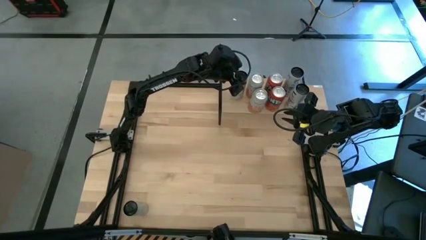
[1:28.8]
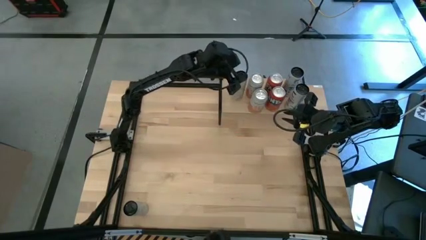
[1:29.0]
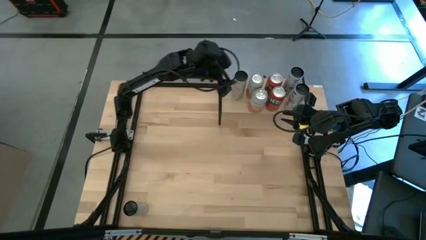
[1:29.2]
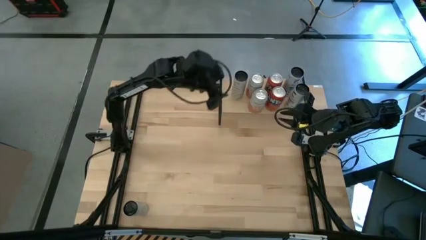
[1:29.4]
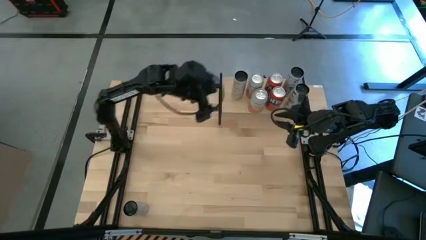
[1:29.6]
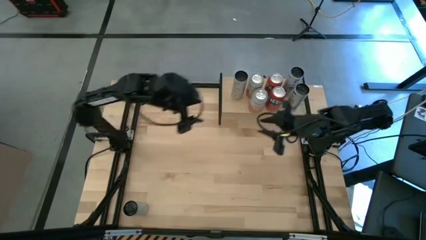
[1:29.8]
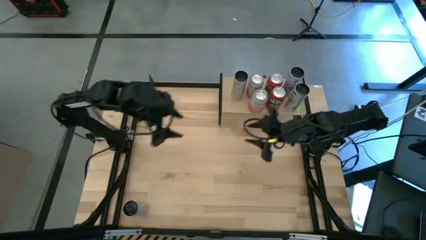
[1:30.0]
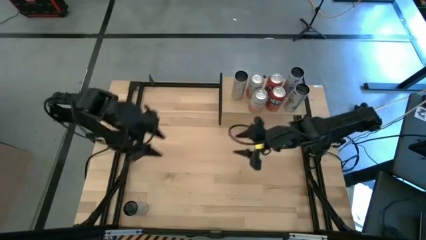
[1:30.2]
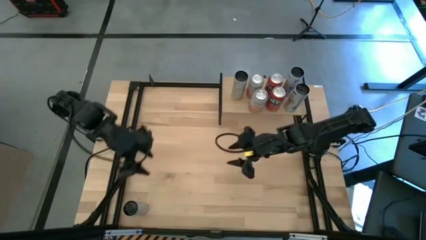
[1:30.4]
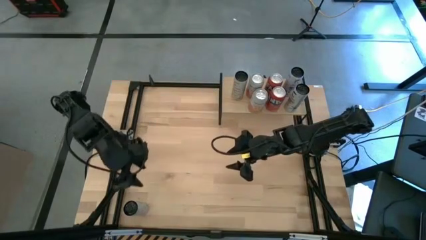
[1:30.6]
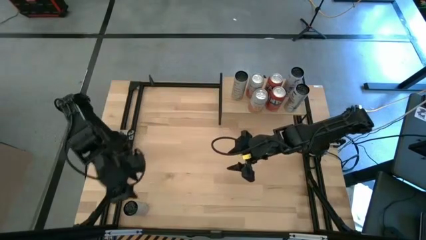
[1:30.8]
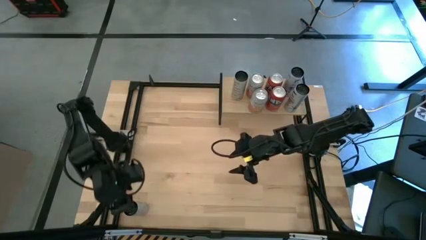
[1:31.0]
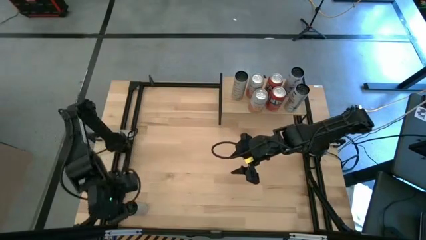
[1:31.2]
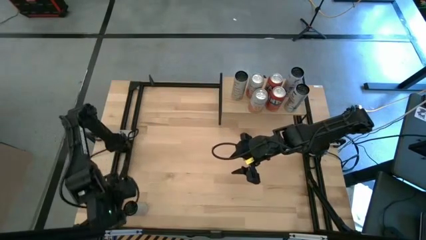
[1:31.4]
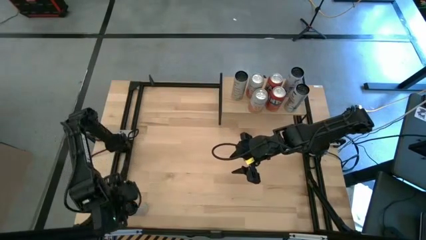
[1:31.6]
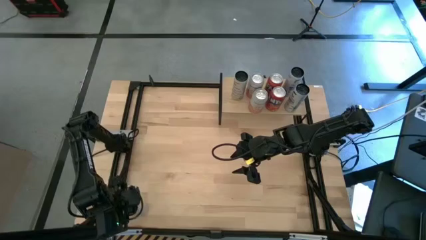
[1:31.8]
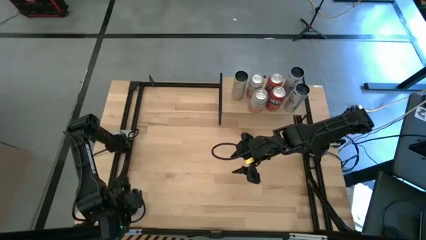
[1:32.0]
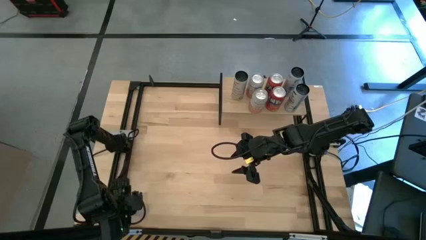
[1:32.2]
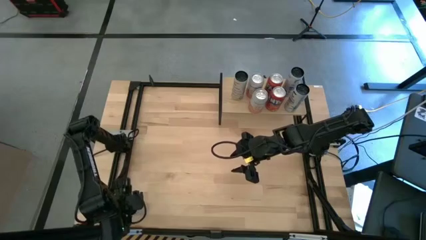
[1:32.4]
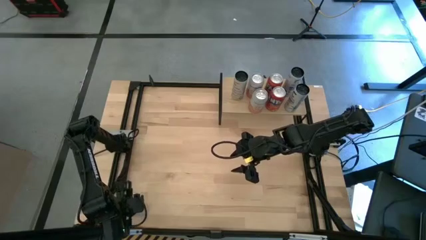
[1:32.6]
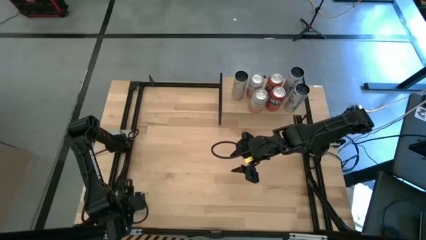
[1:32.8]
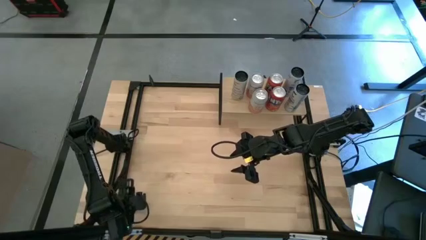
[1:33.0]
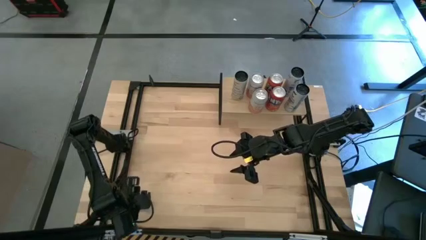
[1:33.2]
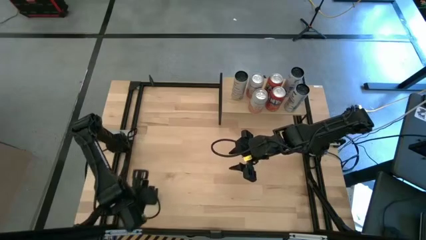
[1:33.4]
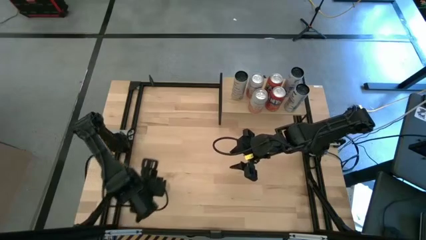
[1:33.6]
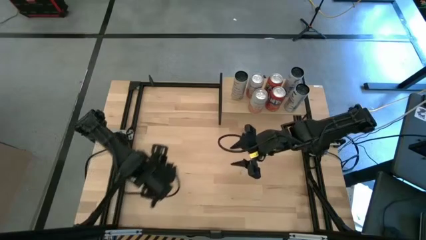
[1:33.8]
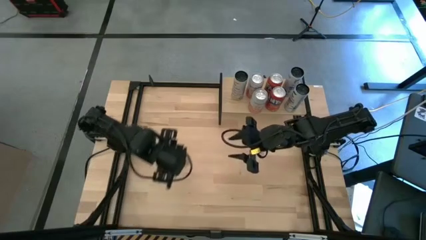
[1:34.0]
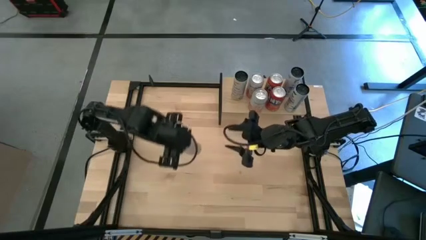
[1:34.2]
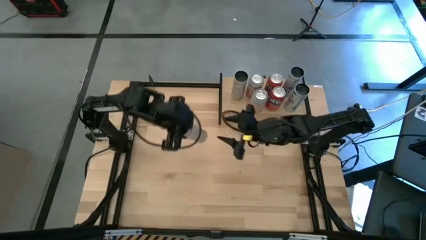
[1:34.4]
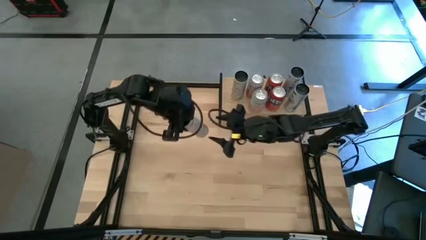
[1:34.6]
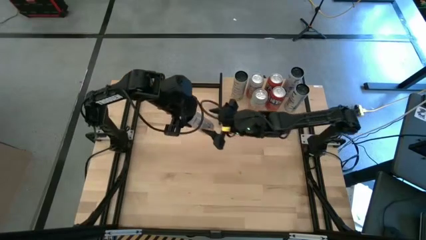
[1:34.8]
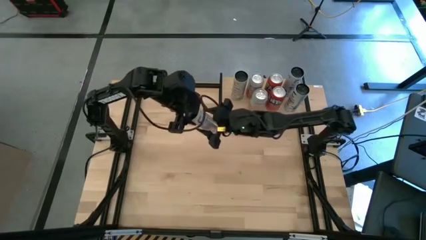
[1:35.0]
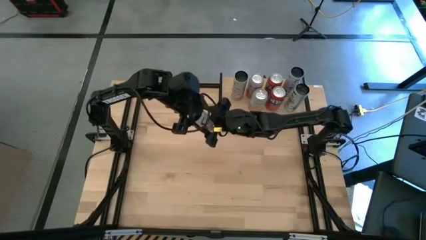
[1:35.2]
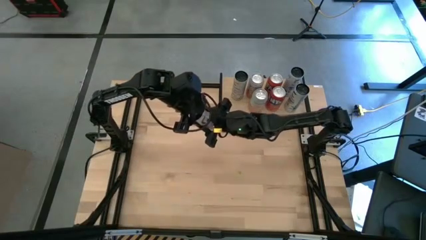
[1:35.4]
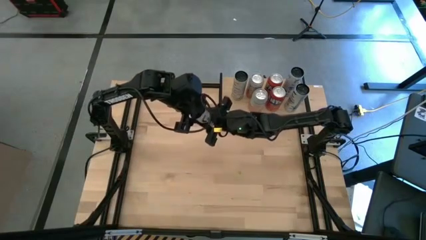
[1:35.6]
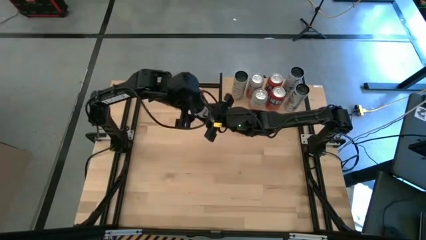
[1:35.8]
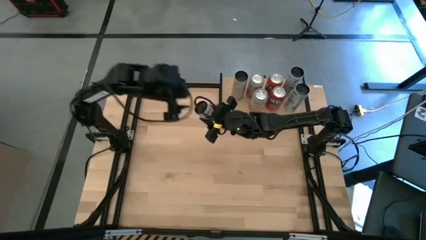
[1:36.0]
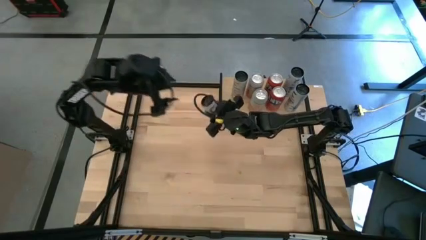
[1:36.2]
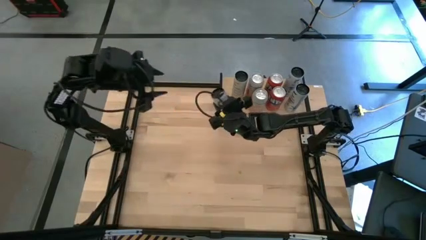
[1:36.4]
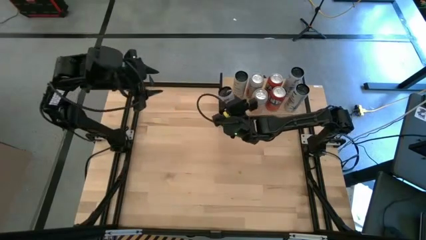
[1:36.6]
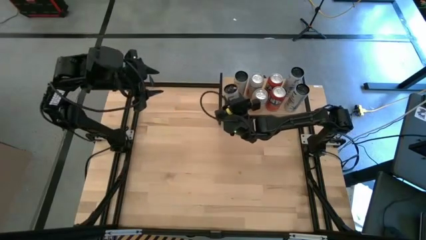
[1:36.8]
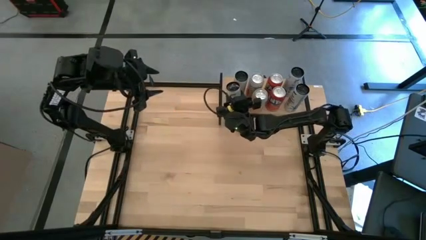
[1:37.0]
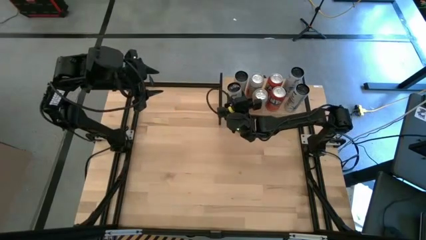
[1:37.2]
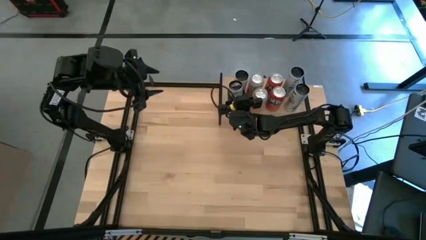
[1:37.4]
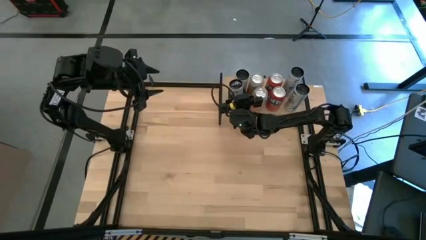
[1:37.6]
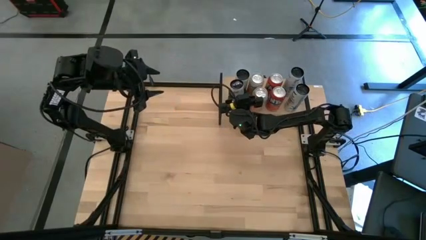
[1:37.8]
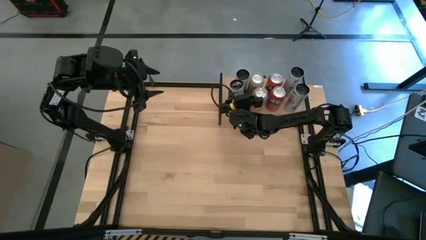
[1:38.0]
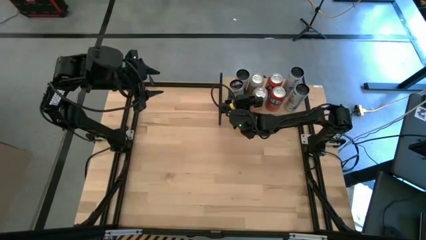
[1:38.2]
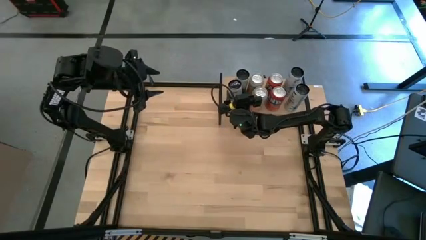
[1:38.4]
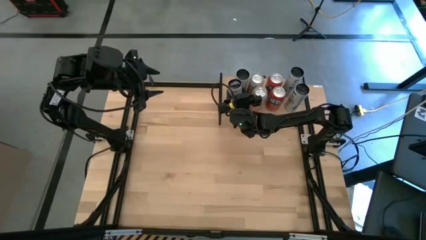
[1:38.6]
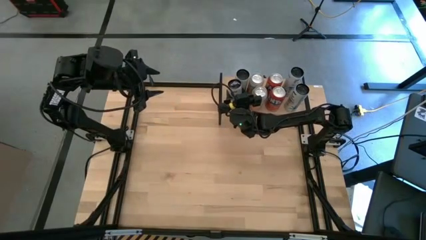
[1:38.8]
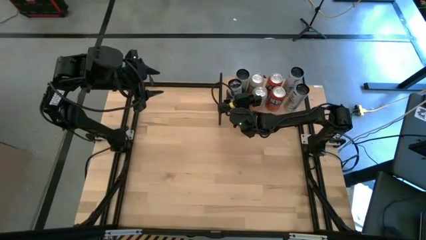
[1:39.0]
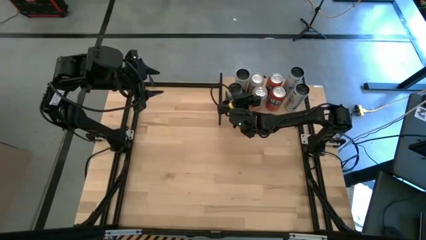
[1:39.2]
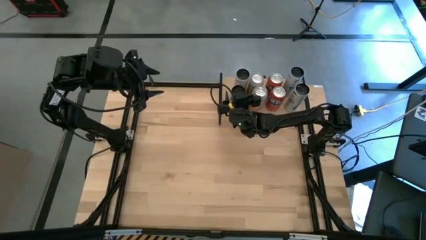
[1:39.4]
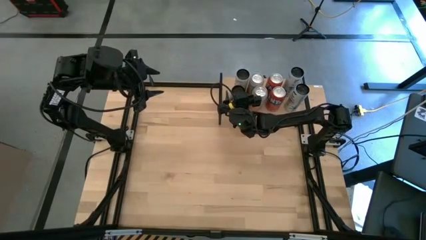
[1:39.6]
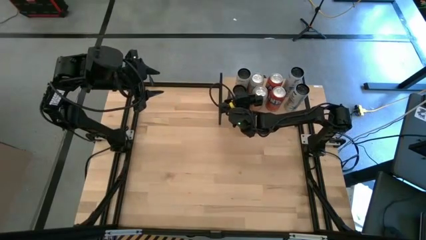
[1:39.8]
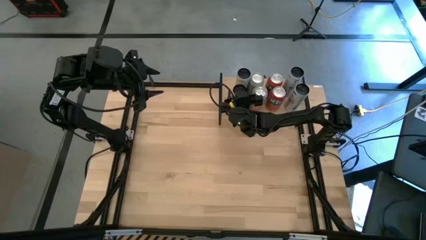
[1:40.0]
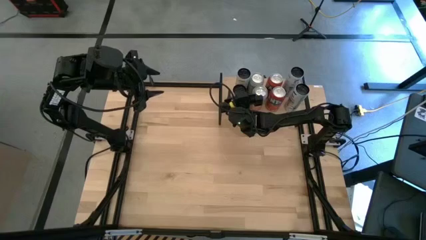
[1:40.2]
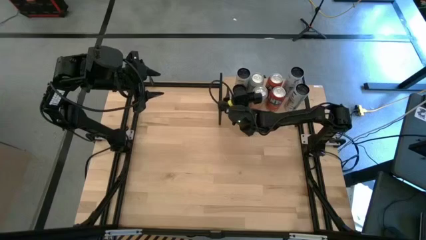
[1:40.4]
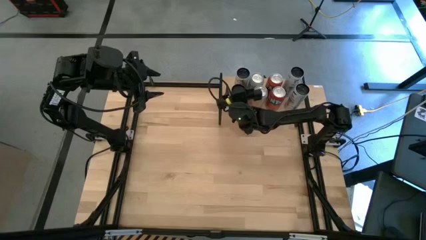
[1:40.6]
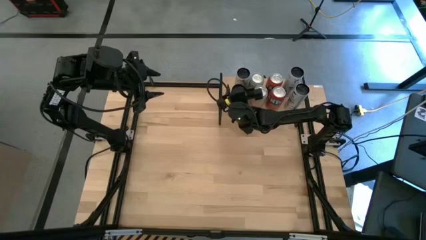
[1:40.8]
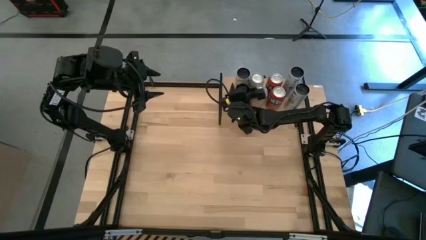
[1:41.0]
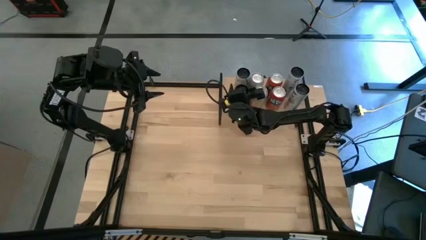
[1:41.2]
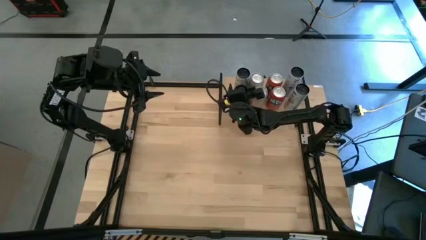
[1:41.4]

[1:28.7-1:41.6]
Task: Place canned beverage on shelf
Put the white yellow soda can on the shelf aligned with the other white yellow soda can

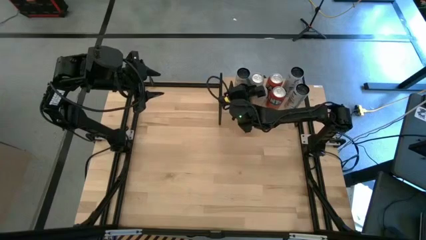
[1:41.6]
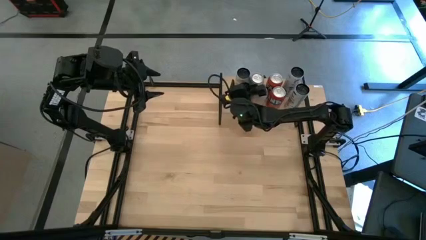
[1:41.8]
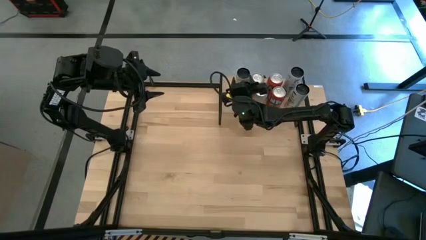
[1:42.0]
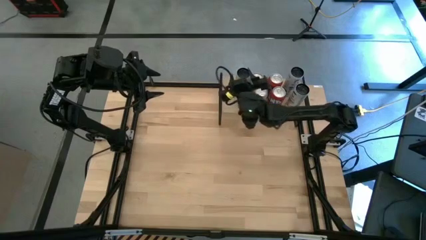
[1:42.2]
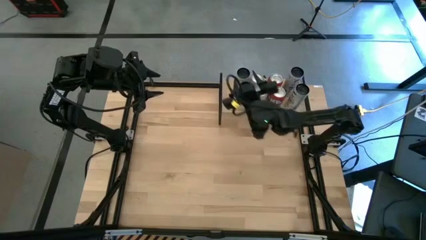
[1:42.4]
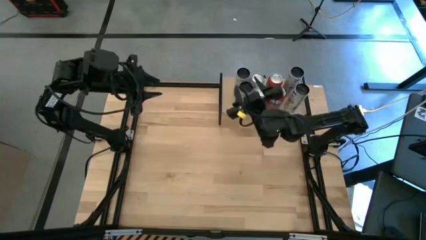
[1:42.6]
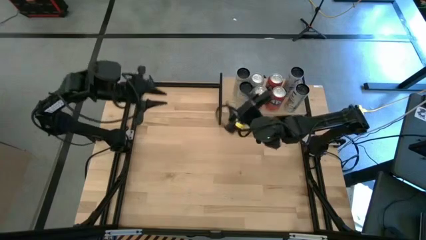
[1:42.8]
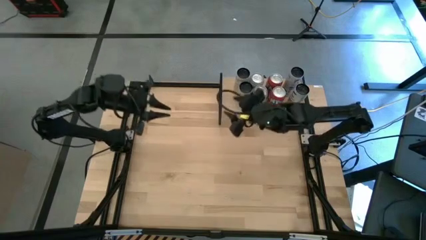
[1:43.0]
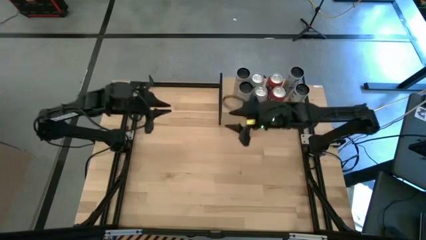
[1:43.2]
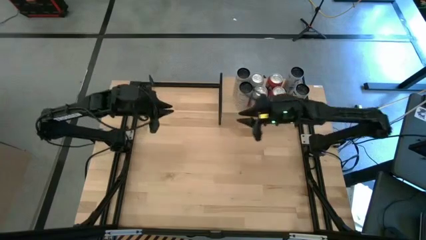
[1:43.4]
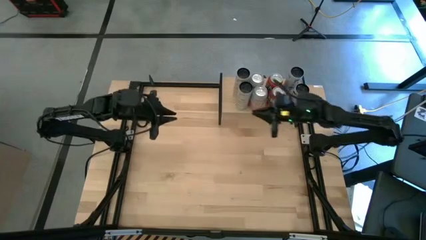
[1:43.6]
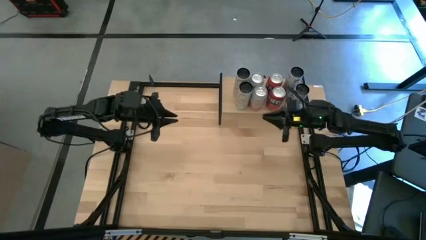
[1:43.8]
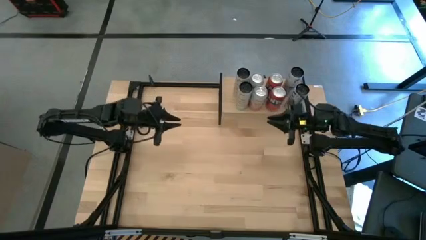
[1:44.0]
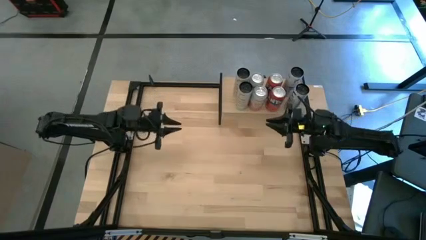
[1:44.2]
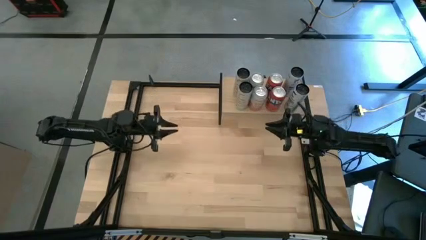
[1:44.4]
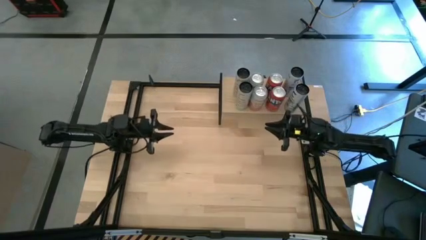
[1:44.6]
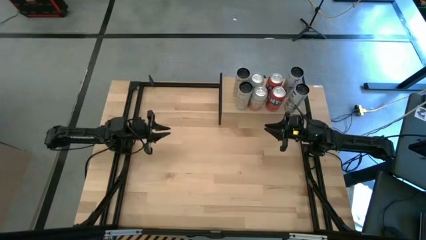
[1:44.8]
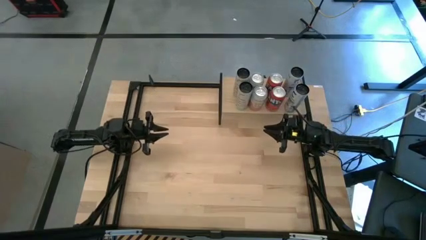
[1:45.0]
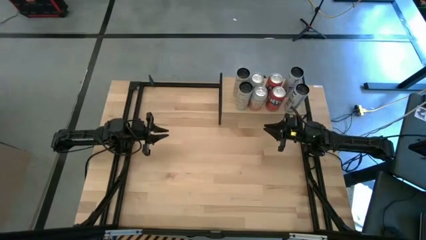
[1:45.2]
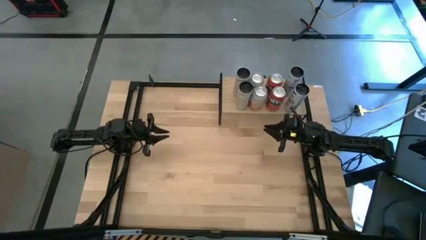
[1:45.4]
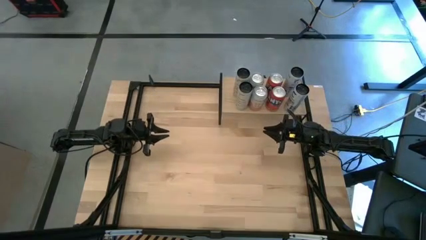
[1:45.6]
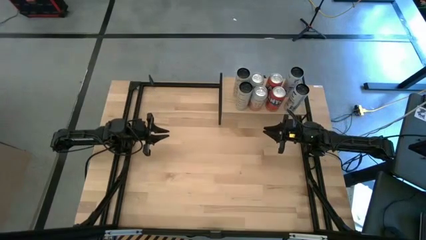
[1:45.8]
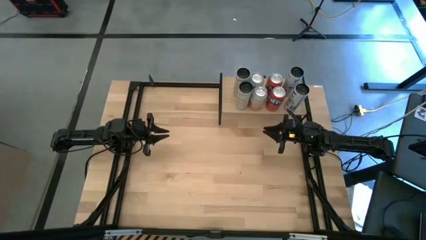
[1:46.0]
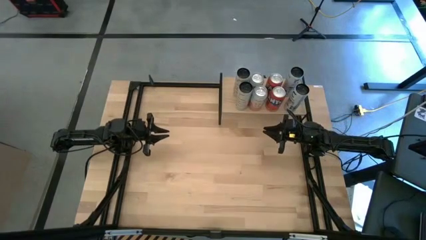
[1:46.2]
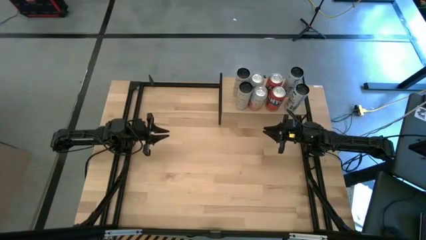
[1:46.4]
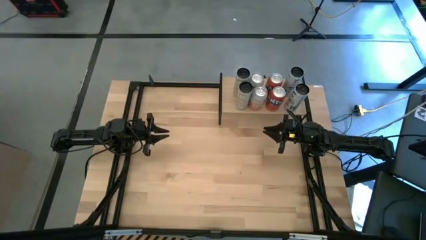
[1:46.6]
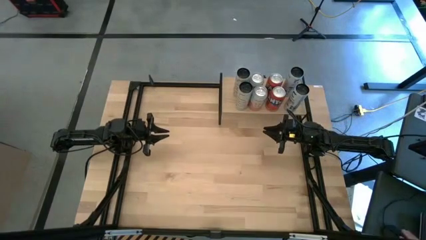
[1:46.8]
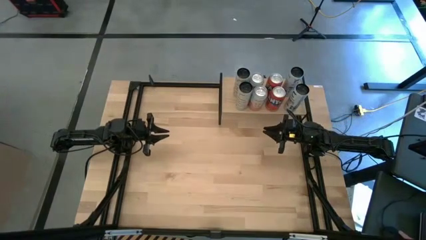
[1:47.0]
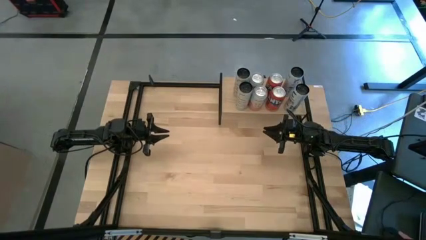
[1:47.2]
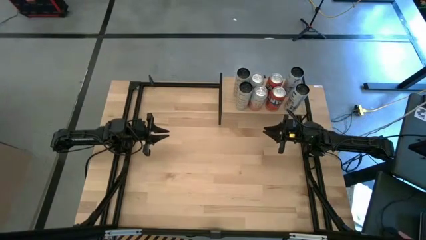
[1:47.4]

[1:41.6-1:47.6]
Return to Home Position
